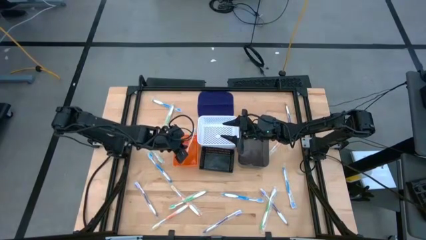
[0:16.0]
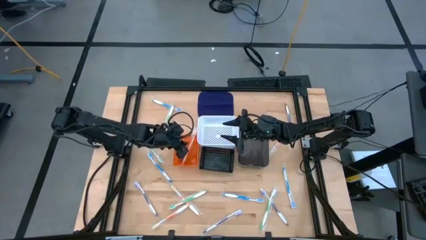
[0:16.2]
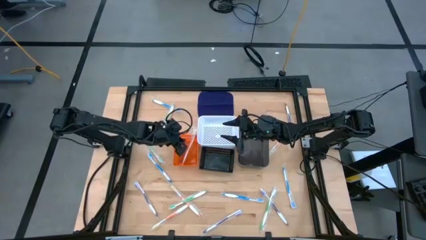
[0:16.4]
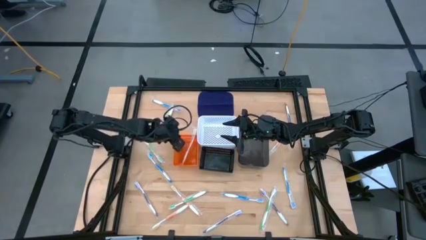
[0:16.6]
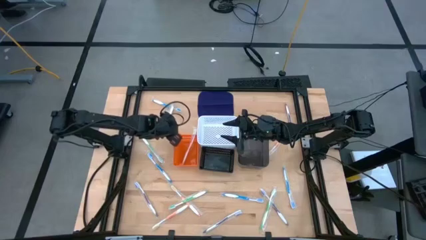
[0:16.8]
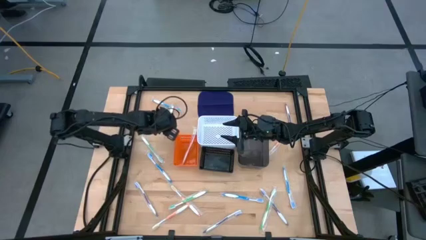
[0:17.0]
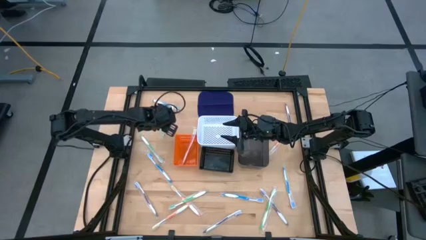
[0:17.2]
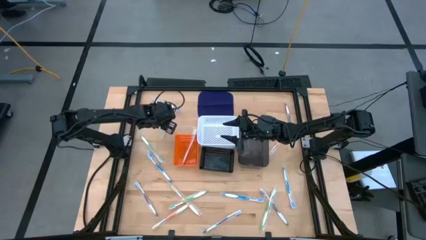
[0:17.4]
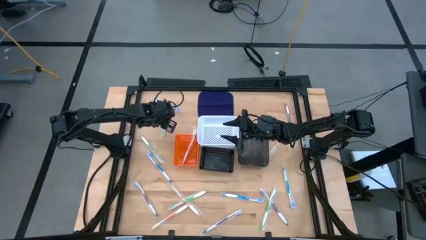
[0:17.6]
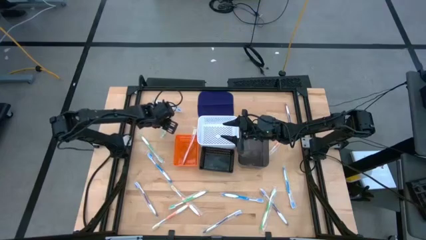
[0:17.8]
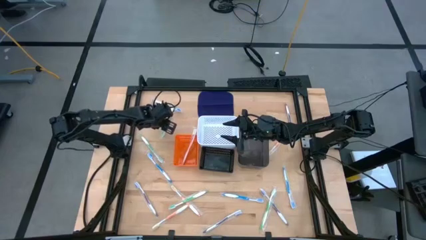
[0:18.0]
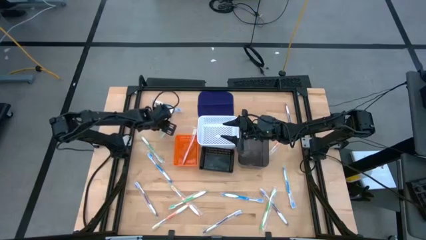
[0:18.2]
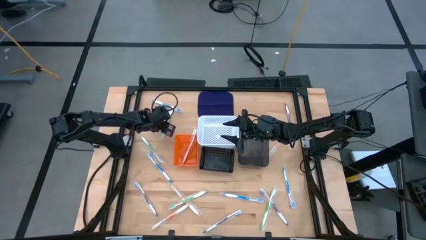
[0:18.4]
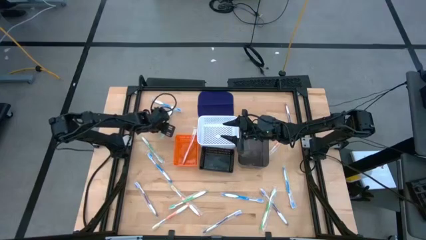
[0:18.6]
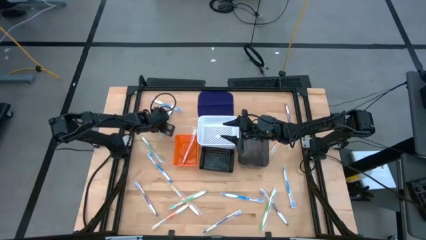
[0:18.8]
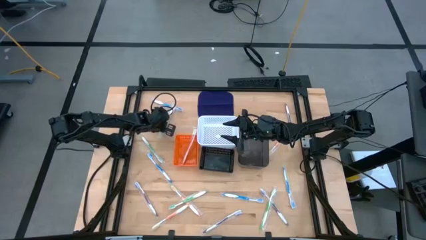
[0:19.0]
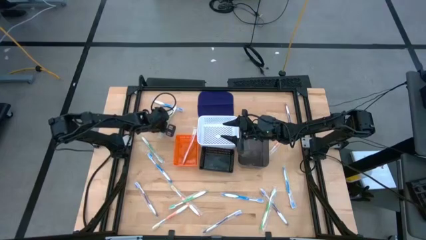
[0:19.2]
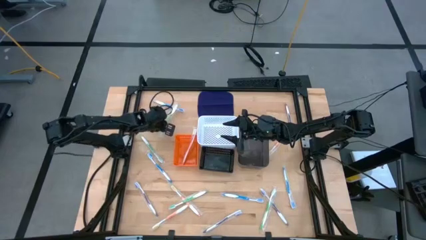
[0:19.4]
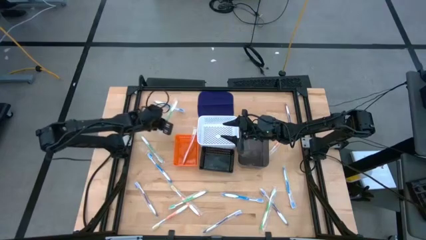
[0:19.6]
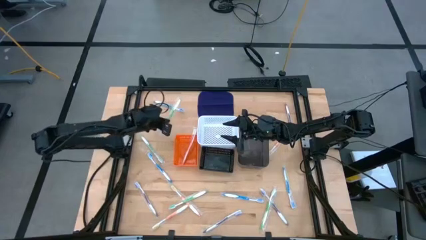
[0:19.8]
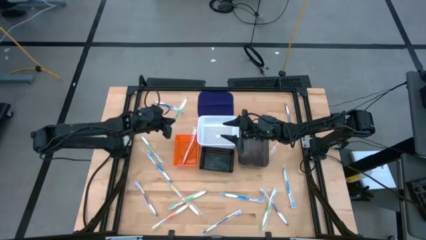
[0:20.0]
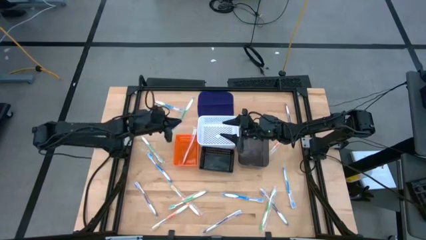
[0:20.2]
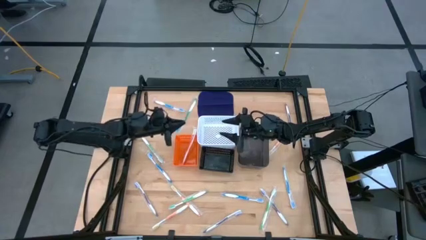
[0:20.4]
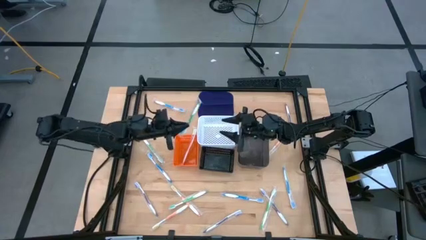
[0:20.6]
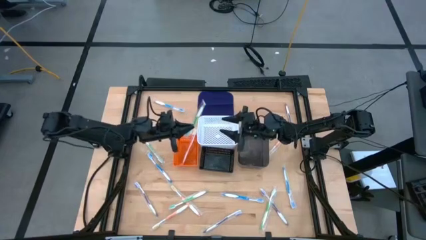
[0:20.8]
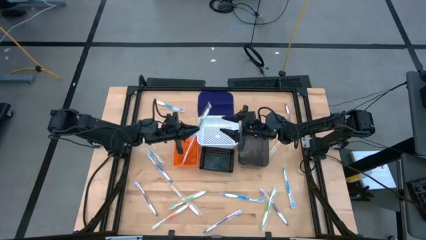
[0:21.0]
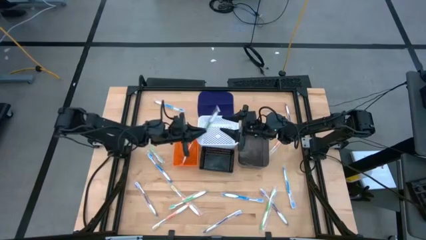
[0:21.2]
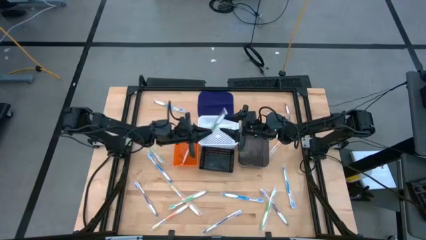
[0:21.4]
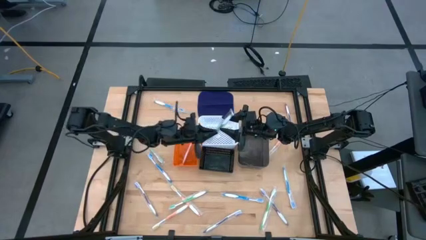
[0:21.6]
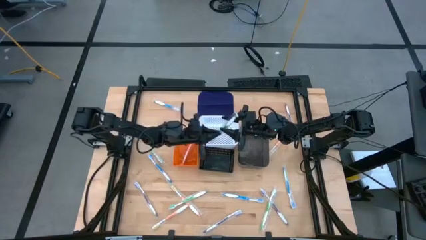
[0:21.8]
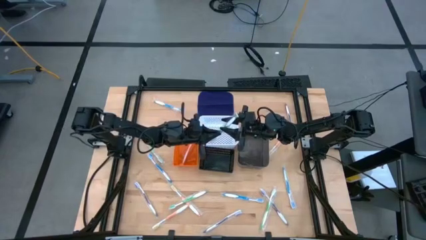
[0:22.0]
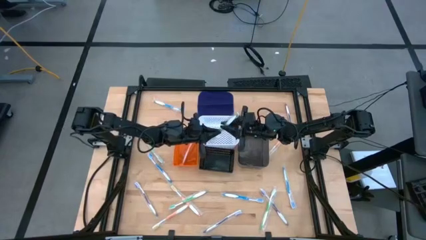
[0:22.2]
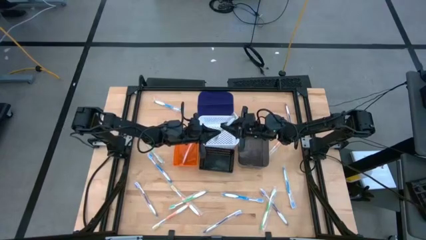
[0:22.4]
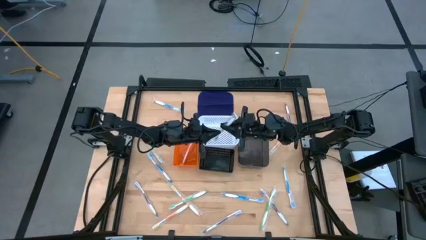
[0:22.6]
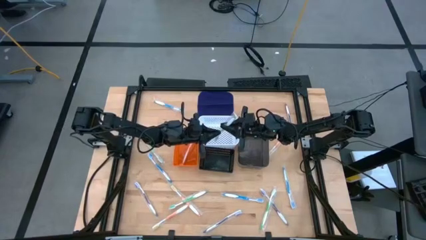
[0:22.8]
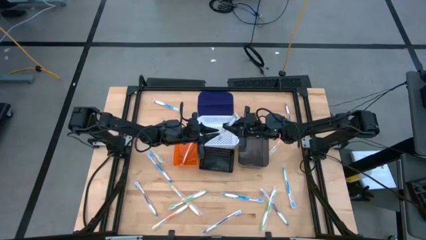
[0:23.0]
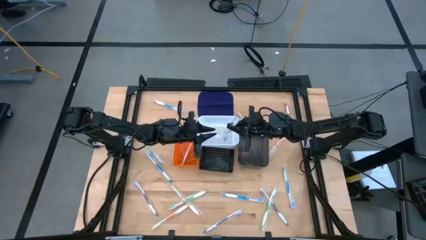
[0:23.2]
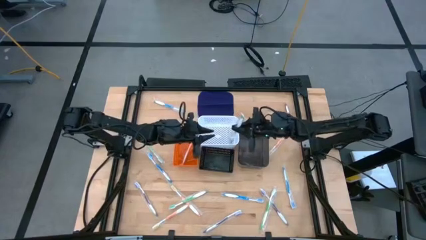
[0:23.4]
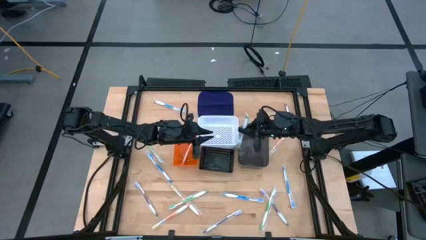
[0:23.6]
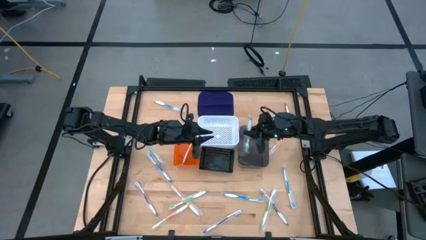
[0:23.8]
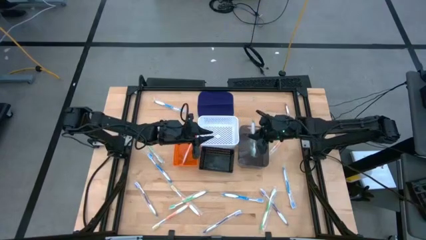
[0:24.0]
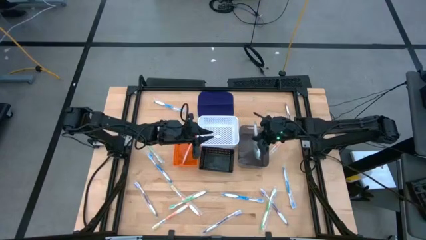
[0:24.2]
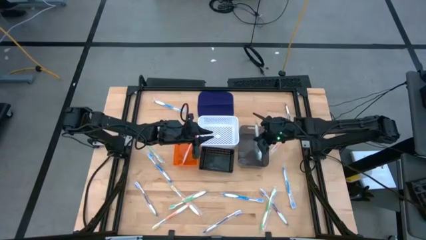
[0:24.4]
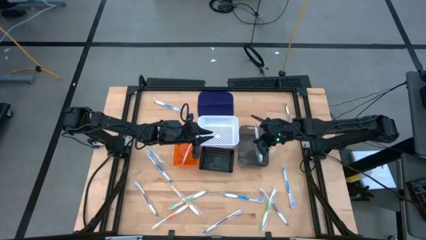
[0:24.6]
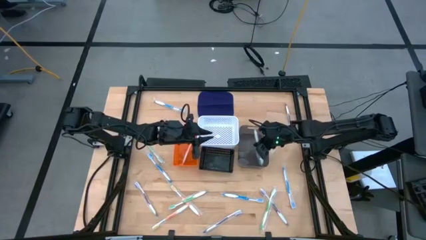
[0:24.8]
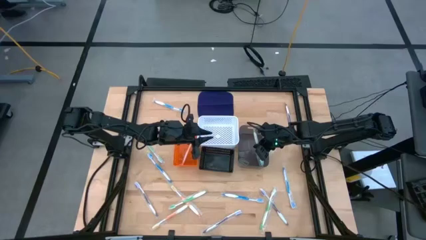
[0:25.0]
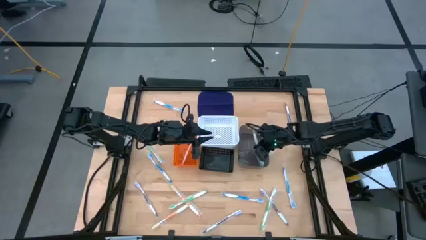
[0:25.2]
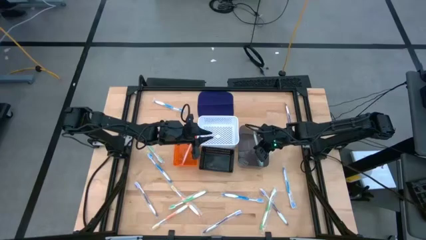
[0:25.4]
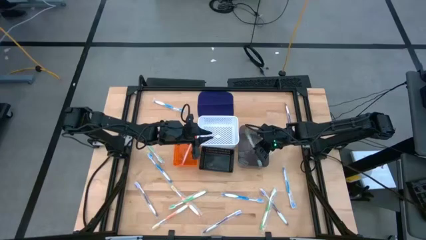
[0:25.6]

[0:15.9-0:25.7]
Task: Pick & Place Toothbrushes
Put the green toothbrush into the black bin

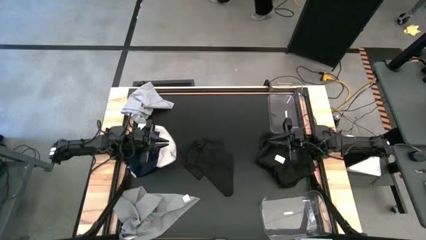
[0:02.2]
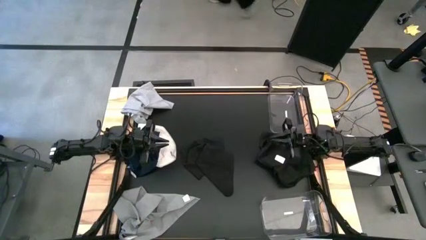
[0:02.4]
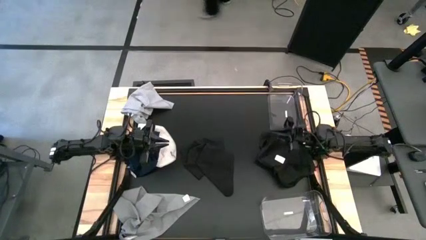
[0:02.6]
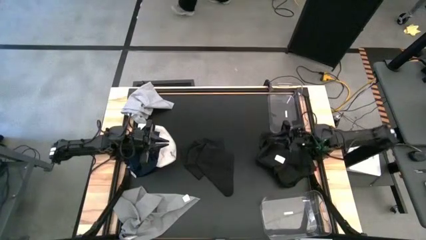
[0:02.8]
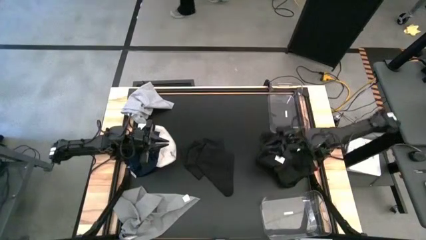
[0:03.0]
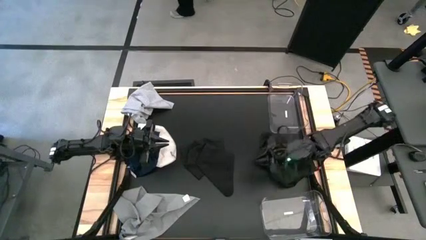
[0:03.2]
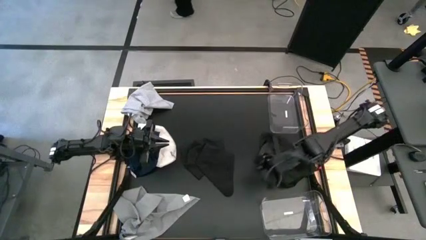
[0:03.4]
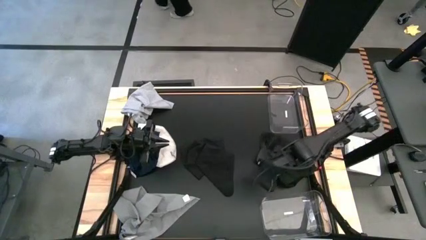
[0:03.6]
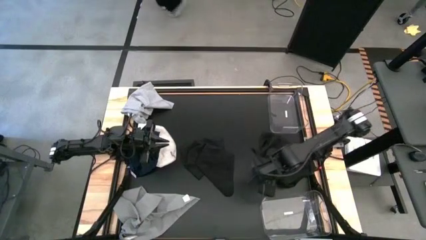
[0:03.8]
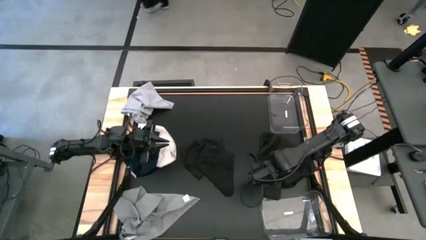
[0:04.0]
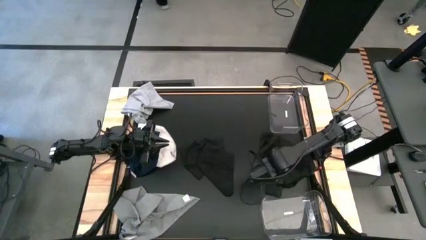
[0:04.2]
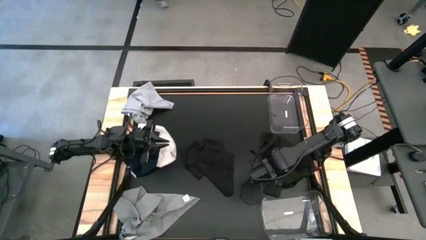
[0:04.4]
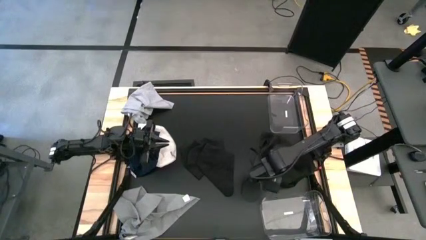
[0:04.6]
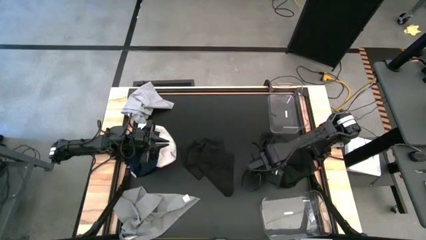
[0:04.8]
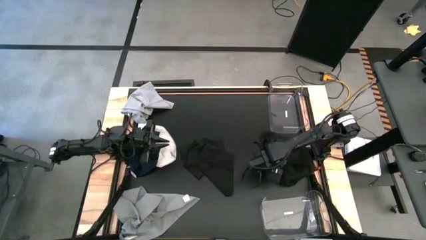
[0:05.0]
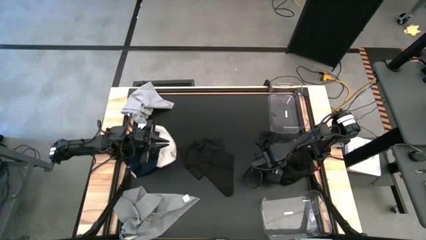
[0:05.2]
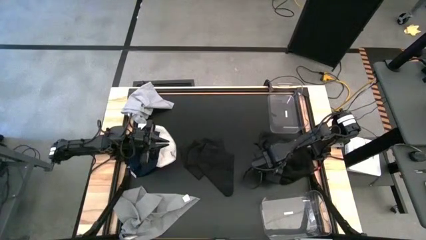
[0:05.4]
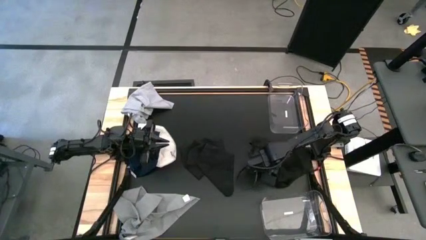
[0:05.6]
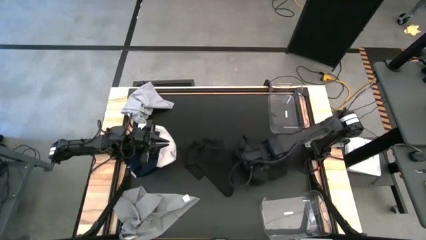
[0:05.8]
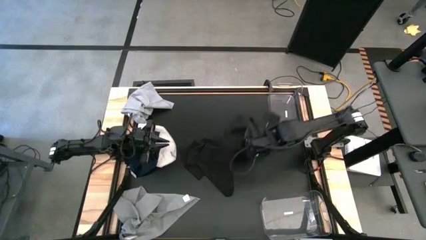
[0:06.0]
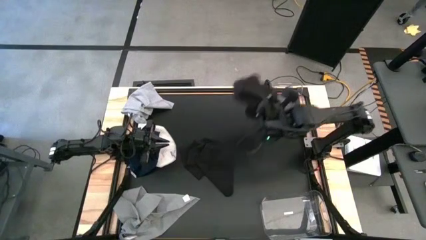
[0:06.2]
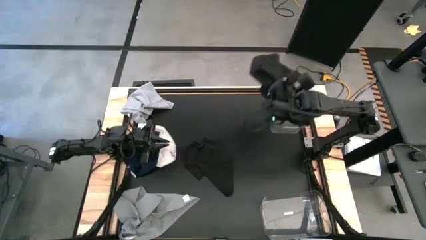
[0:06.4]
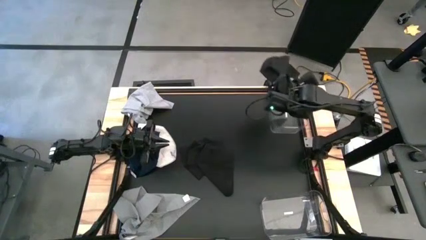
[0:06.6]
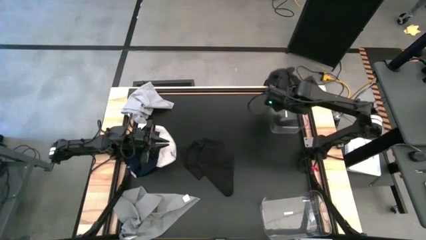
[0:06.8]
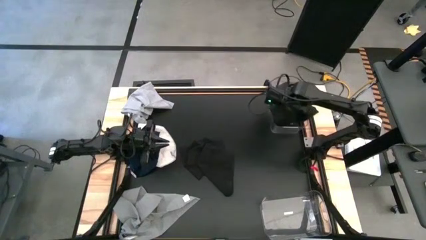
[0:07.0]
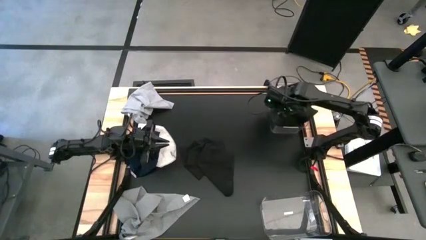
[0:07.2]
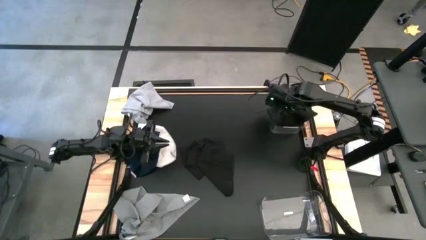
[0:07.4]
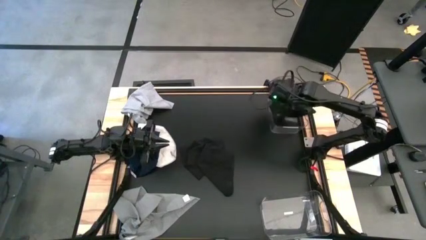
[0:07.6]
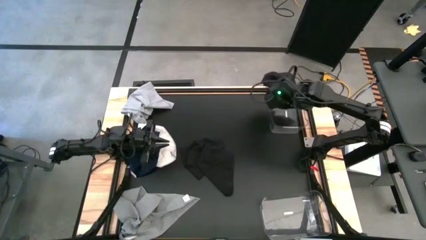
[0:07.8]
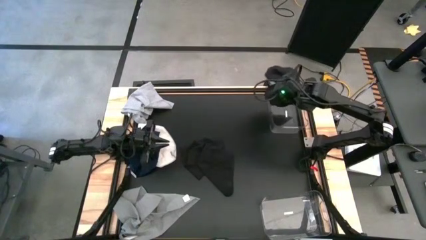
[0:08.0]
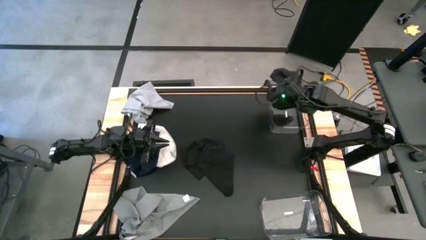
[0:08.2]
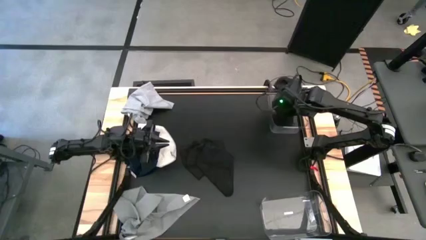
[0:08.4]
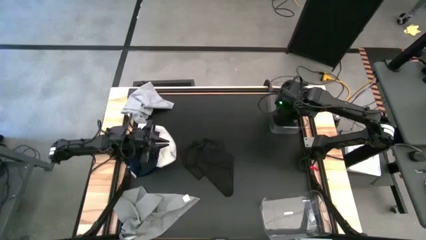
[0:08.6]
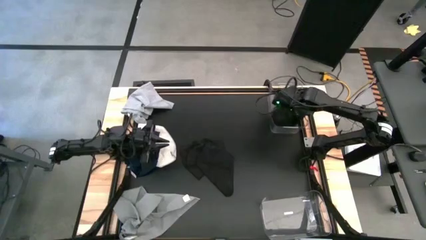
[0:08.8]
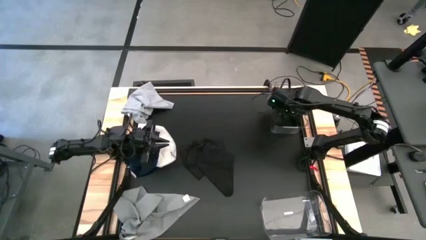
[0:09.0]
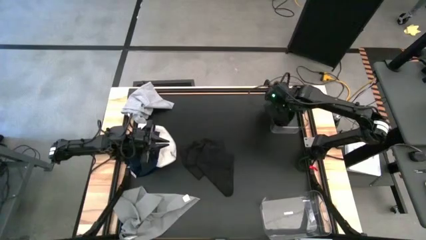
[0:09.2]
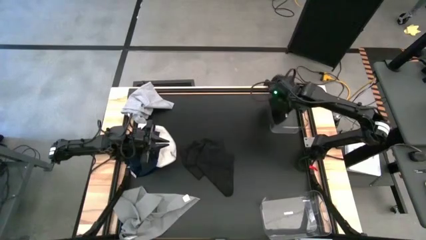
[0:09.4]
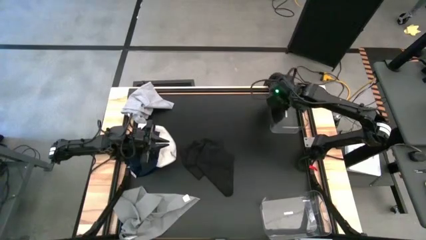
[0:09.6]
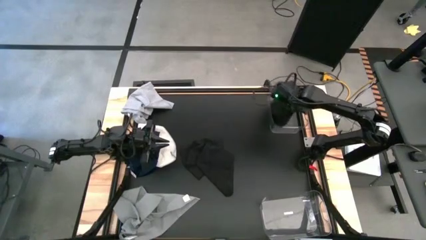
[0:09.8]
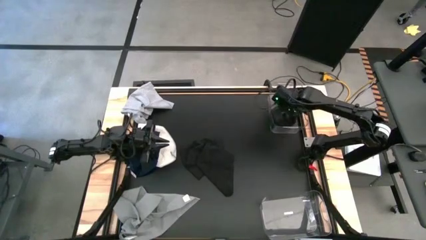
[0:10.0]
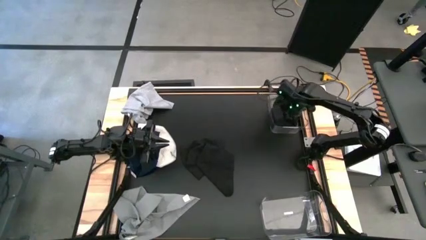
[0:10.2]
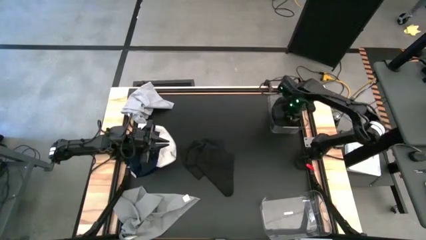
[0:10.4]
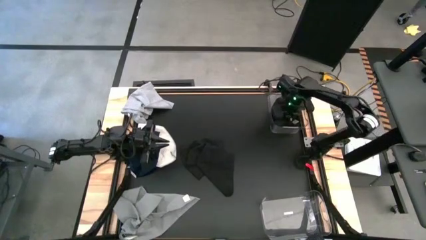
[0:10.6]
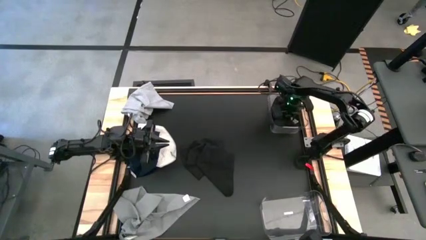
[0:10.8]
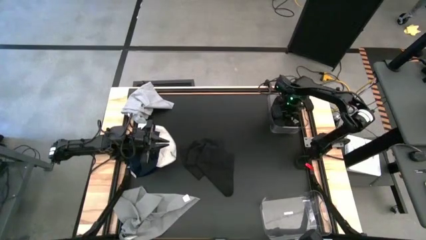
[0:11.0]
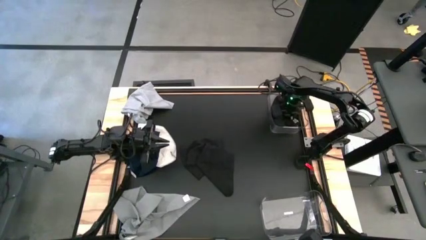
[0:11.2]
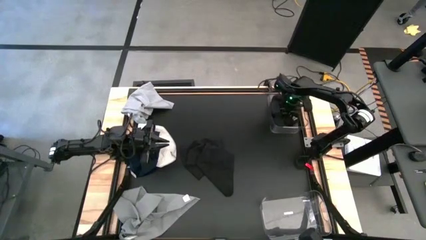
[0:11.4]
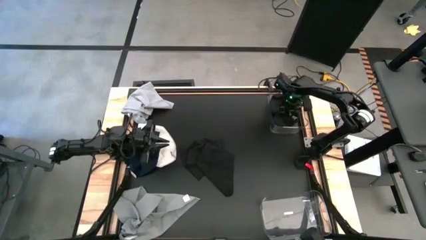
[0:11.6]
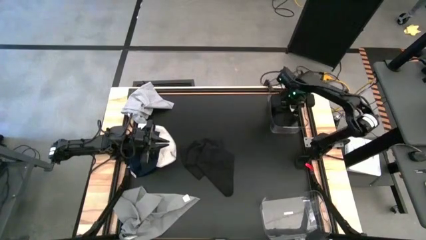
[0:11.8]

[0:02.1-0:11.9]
Task: Sort towels by color in basket
Put the right black towel into the top transparent bin
